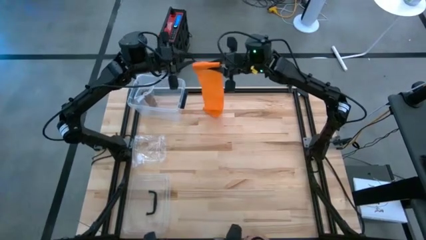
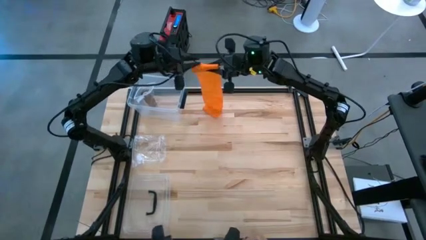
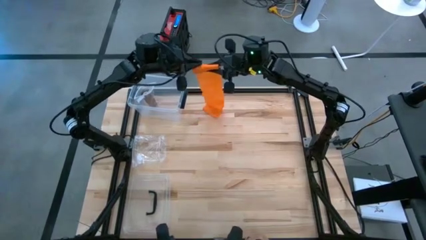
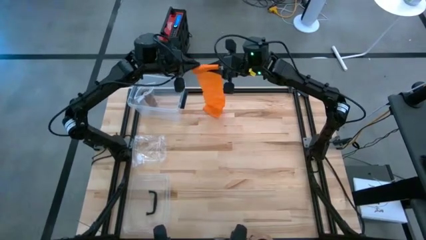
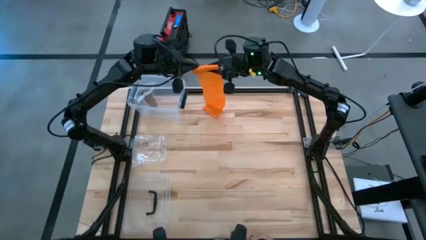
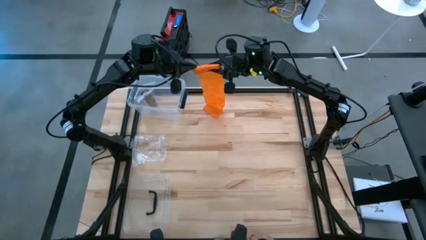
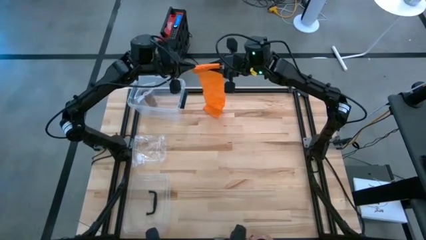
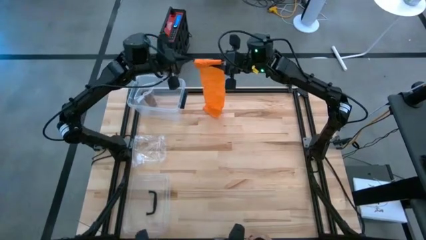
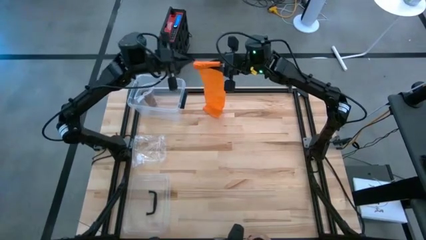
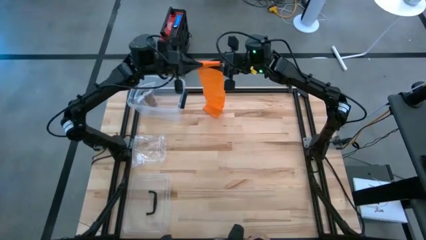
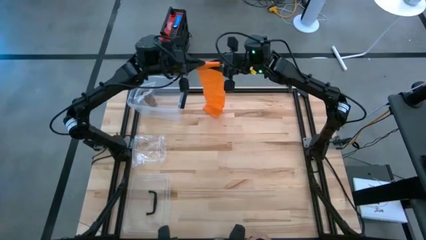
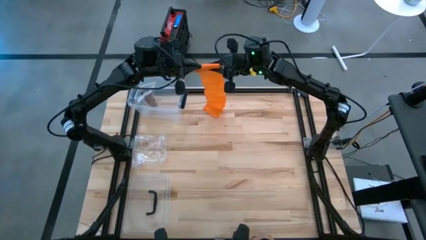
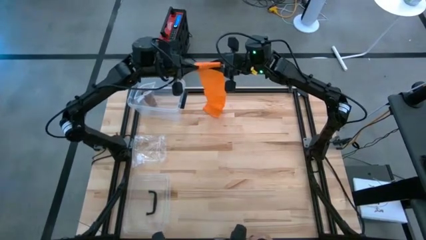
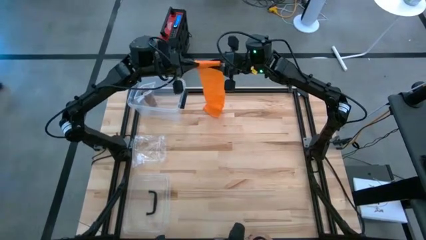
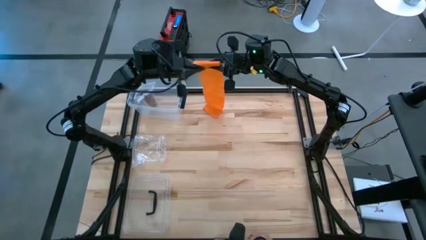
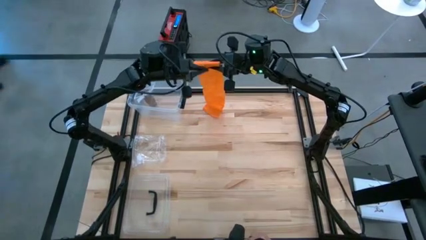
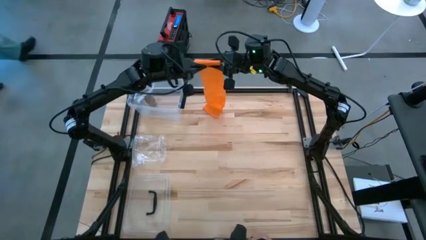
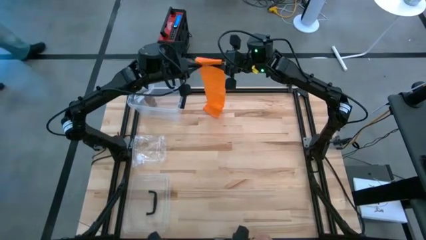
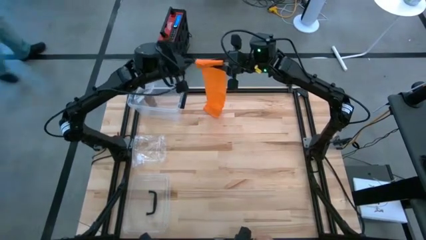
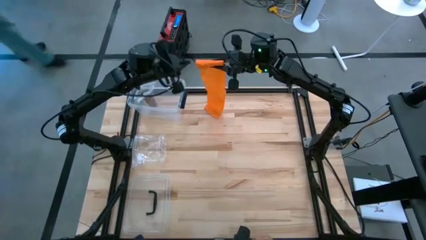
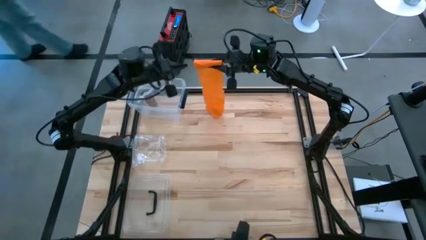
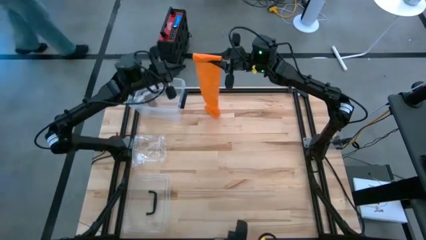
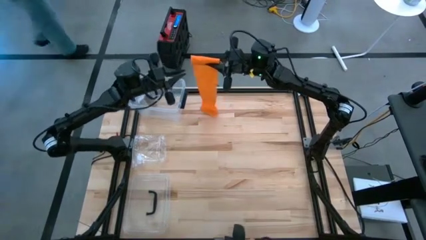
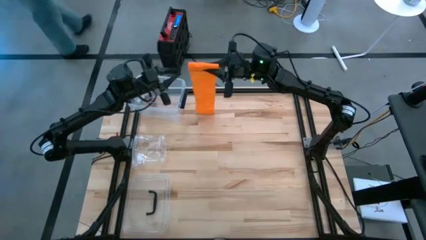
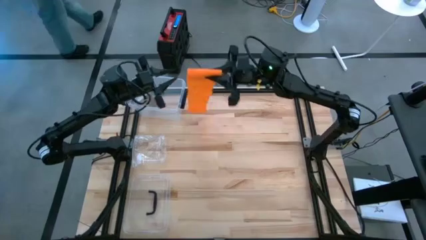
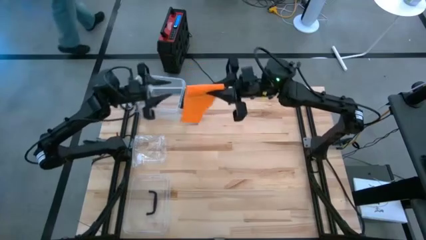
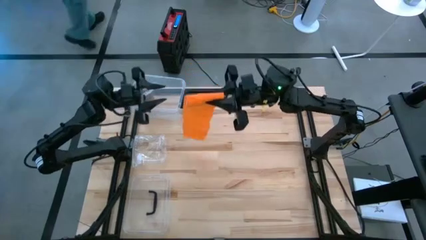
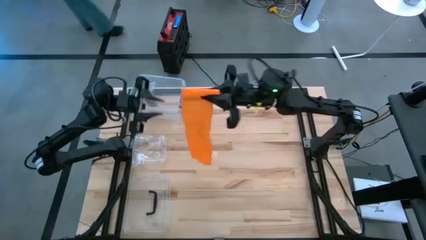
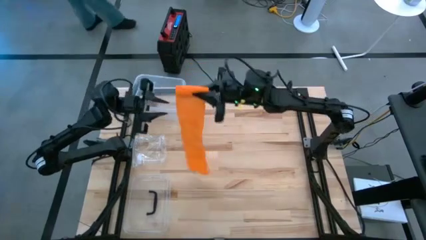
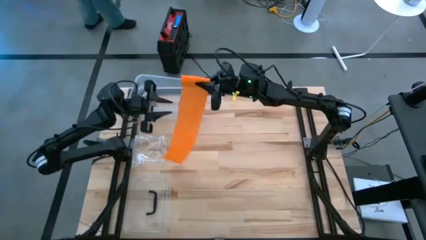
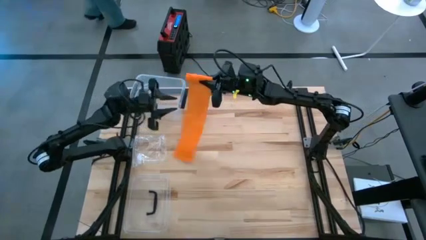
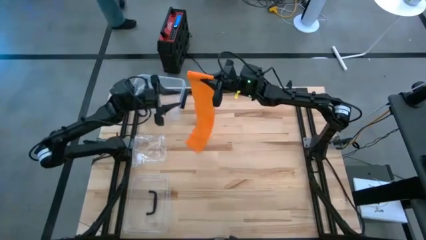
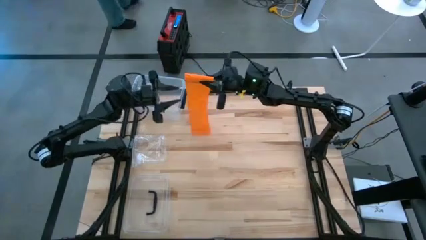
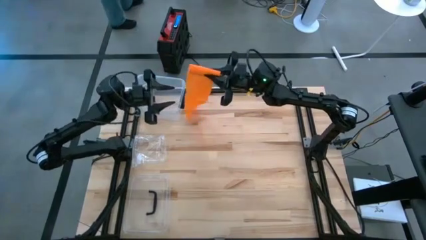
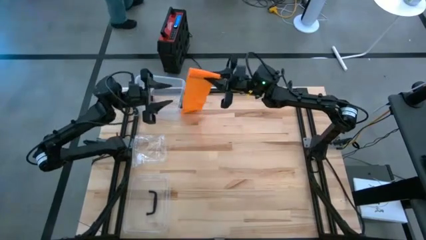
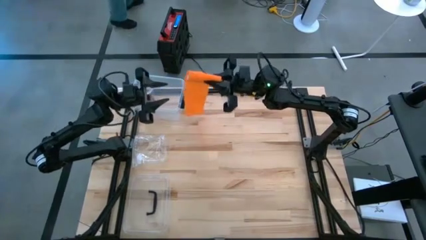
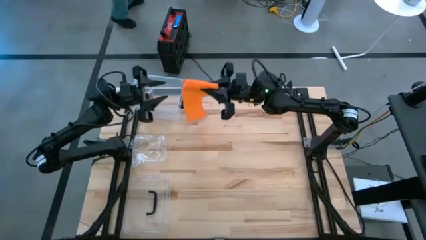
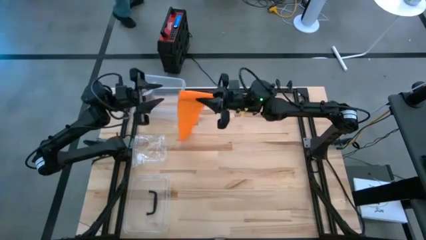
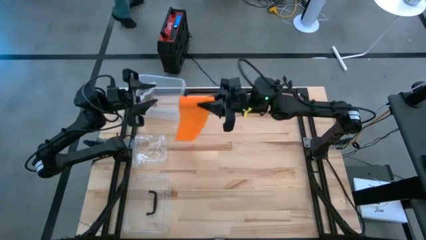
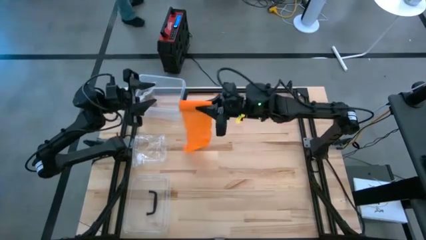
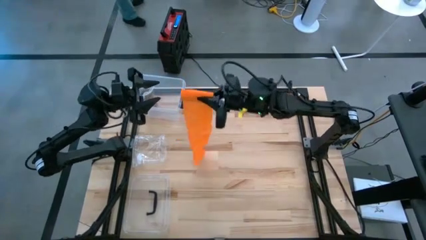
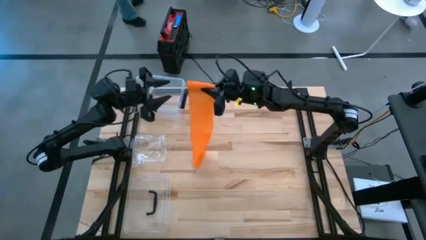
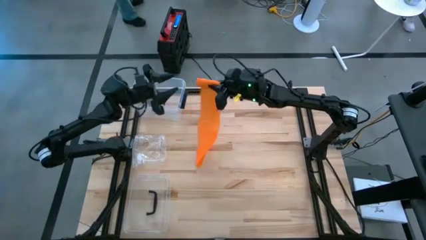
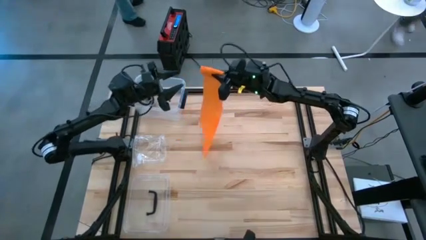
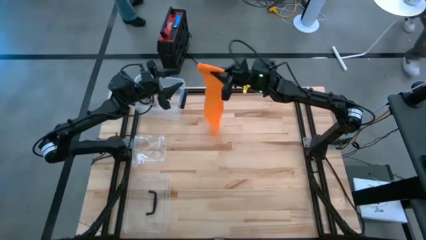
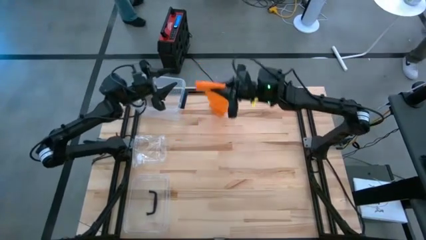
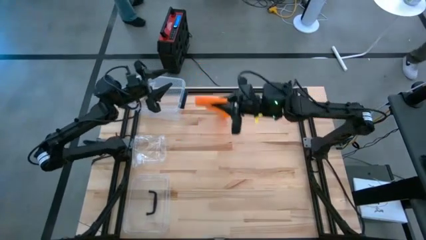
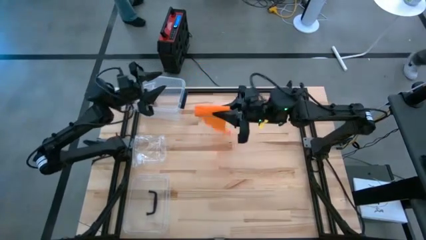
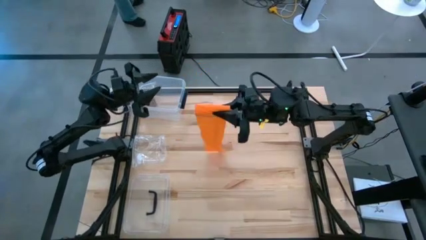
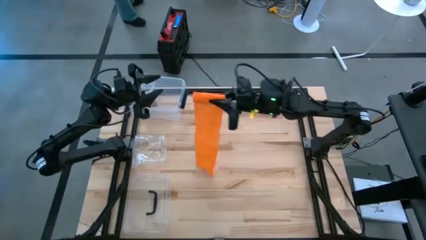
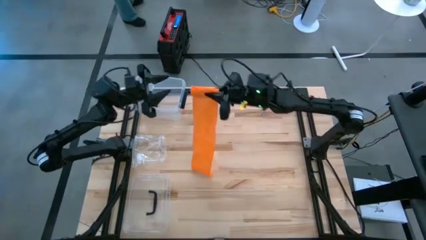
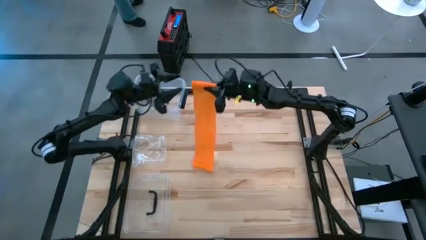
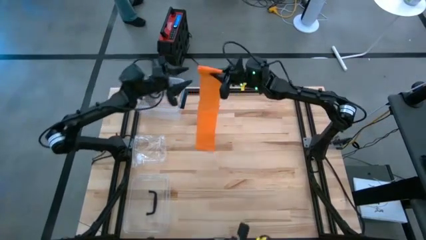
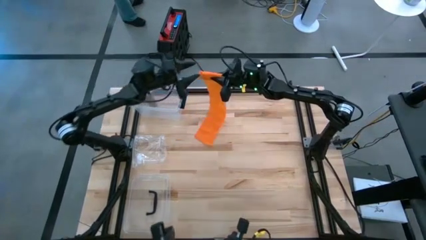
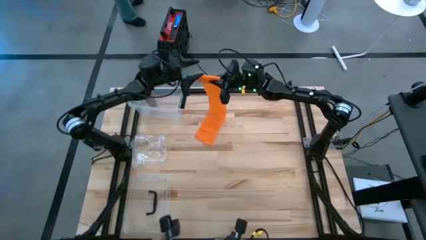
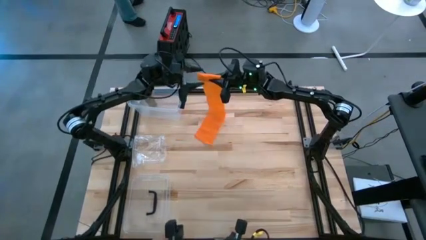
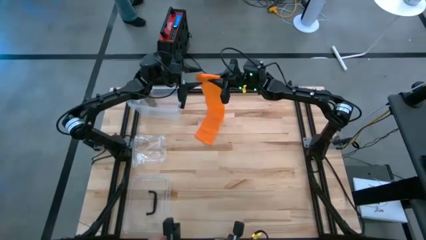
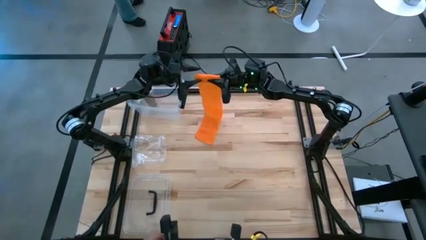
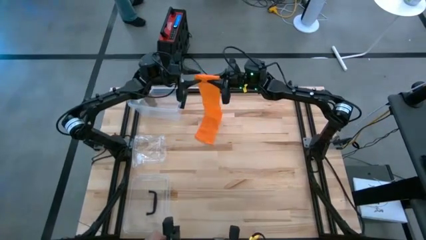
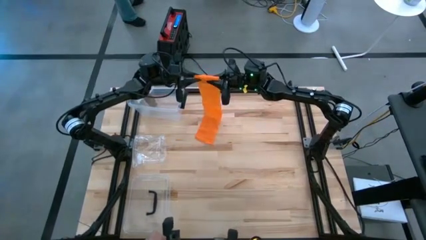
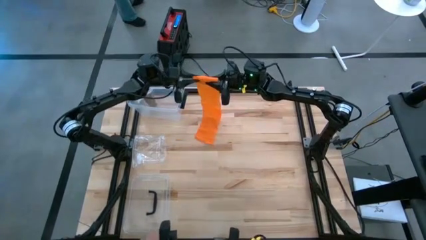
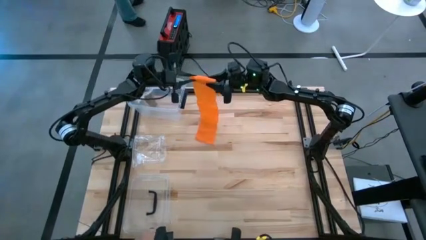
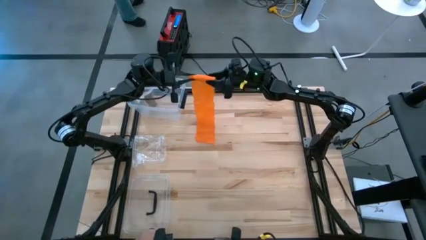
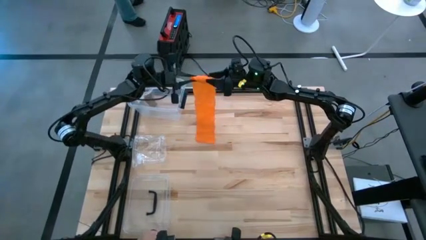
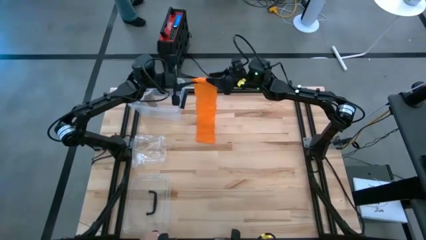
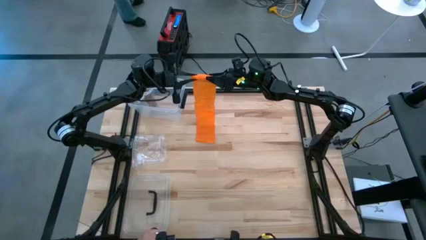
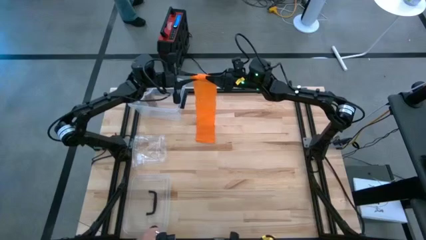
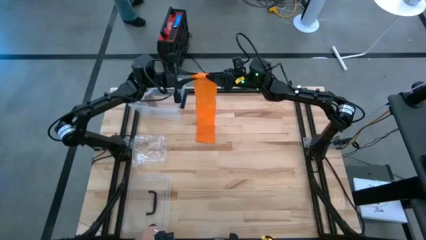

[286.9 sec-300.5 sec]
Task: Roll bandage
Roll the orange bandage

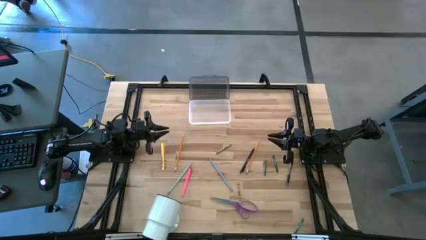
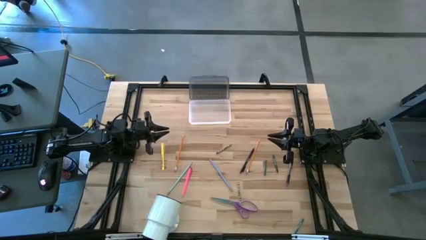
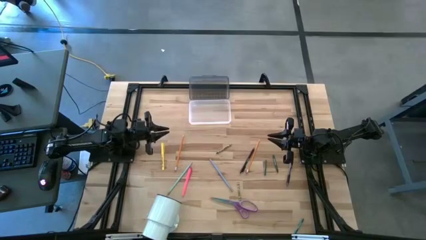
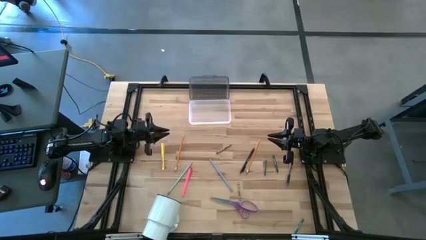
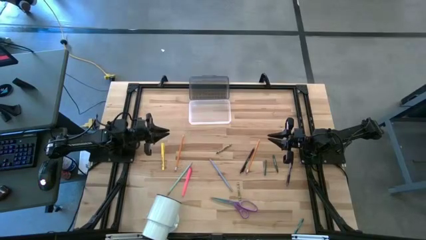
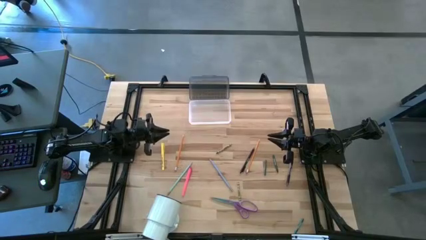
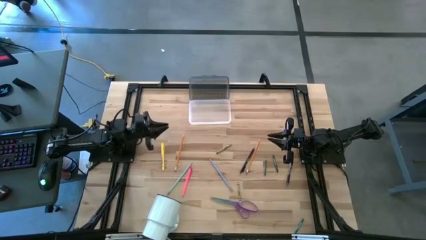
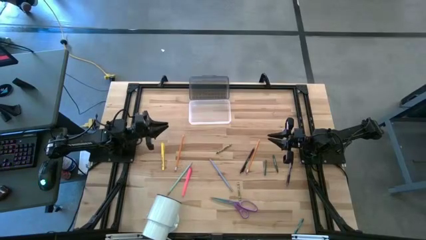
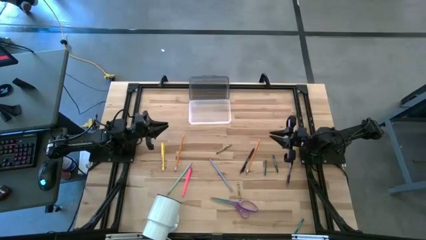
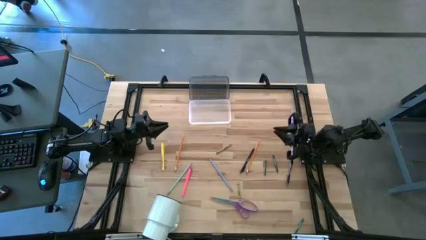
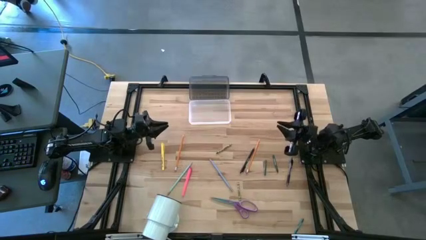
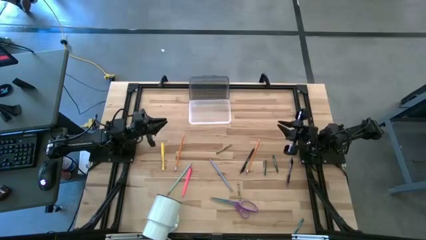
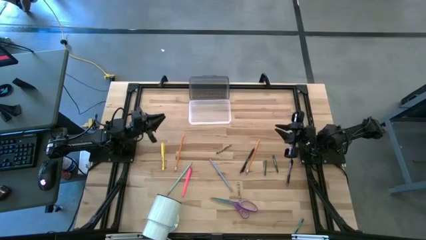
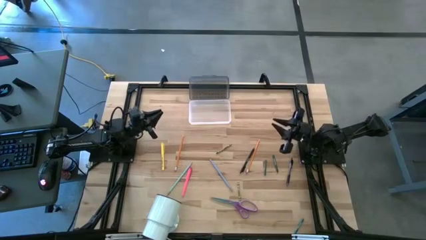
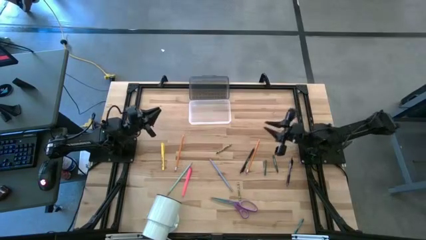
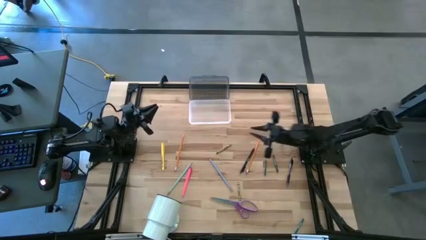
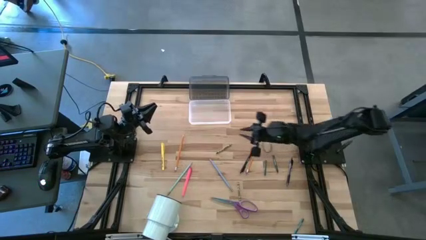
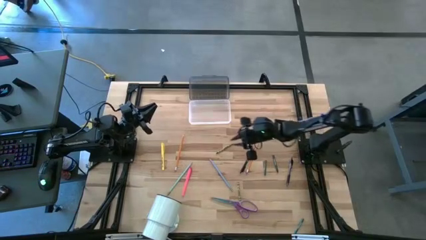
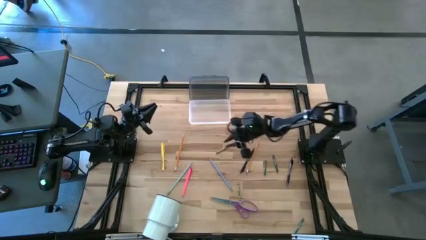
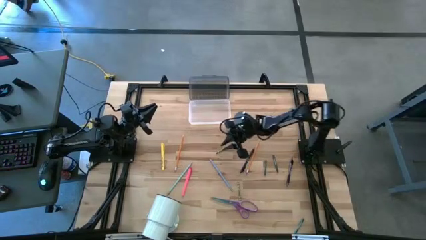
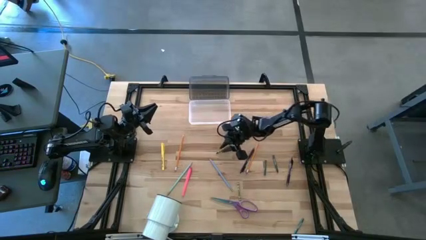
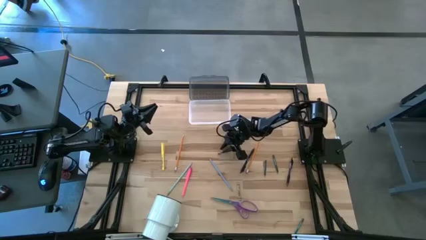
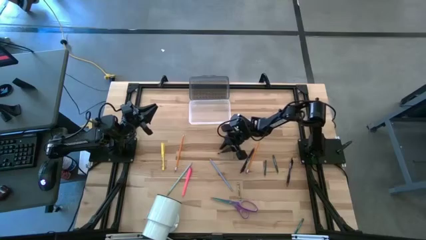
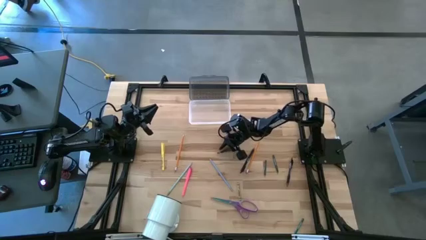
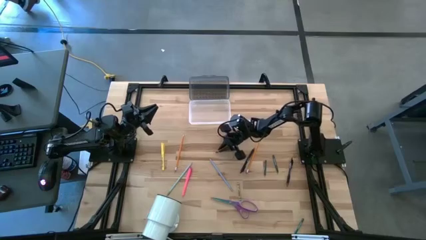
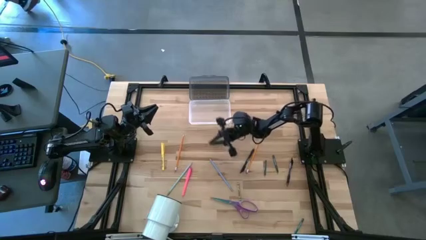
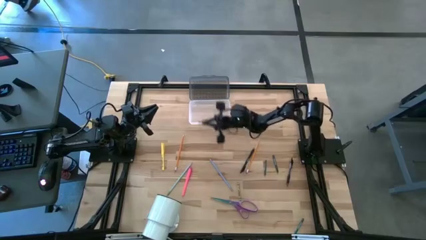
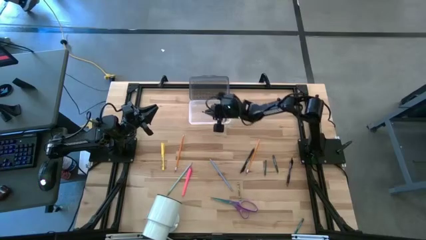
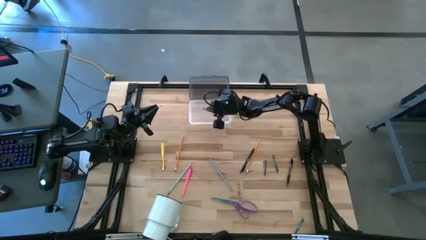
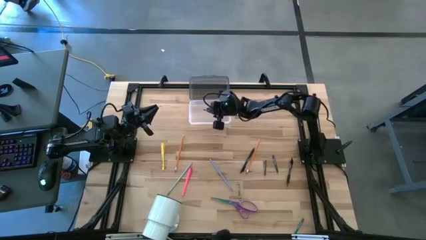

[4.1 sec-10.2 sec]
Task: Pick & place school supplies into a supply box
Put the top green crayon into the supply box
